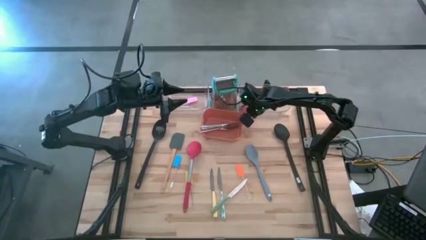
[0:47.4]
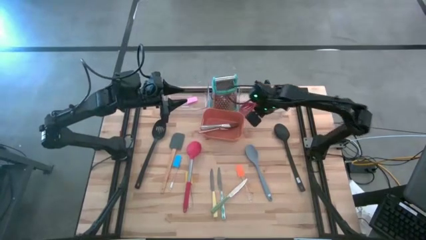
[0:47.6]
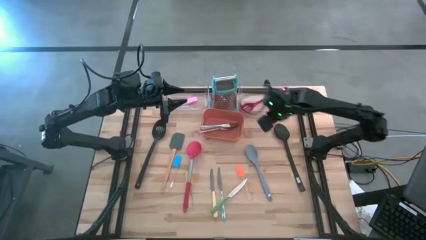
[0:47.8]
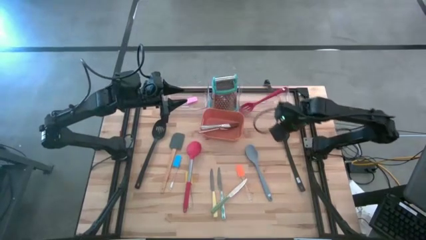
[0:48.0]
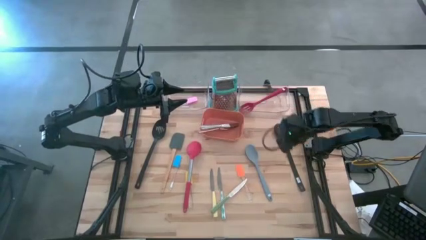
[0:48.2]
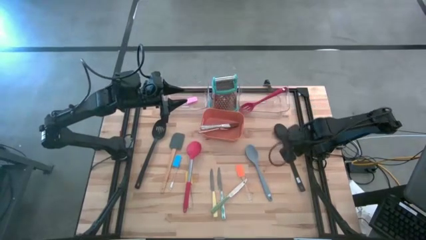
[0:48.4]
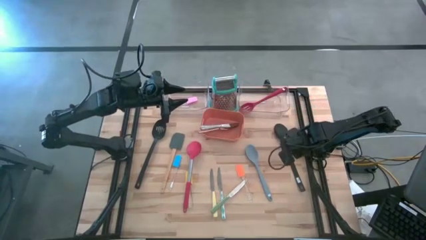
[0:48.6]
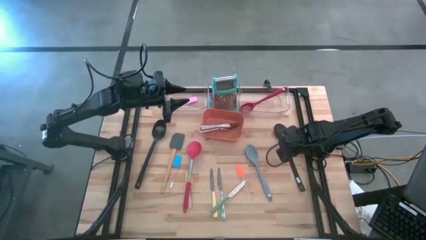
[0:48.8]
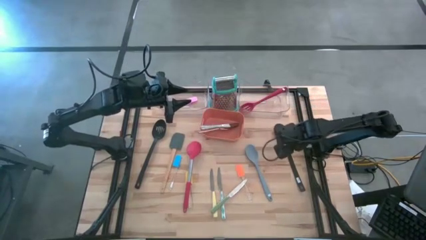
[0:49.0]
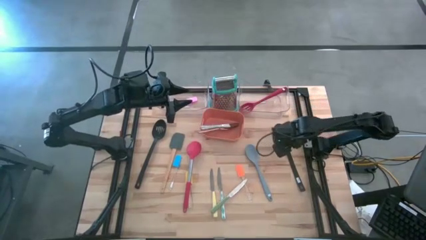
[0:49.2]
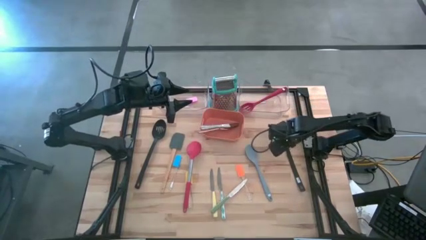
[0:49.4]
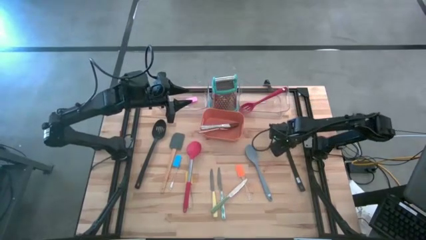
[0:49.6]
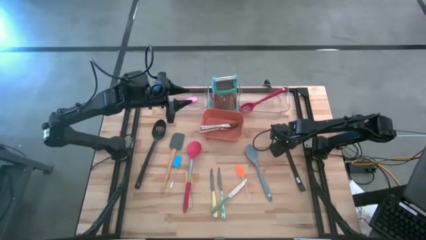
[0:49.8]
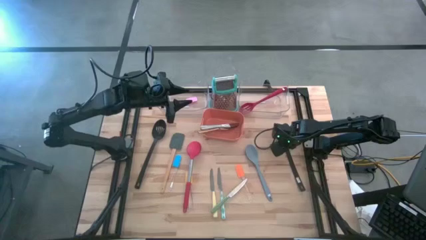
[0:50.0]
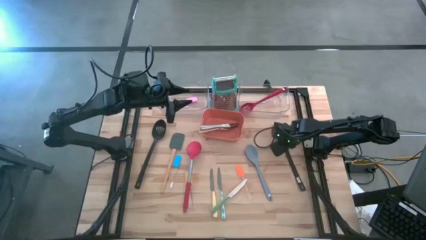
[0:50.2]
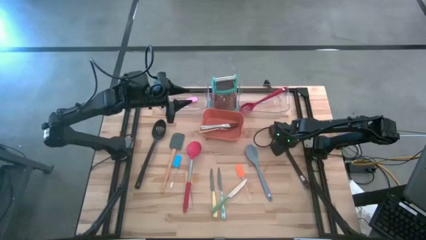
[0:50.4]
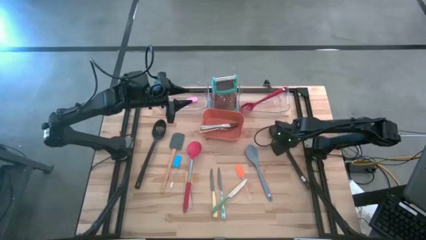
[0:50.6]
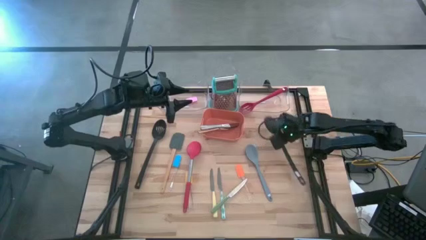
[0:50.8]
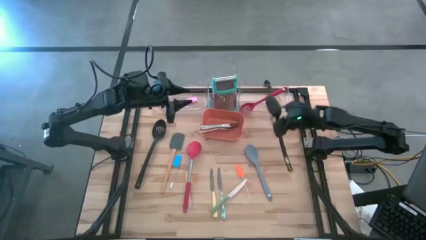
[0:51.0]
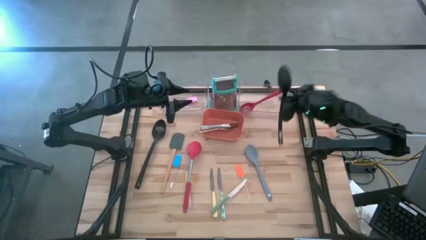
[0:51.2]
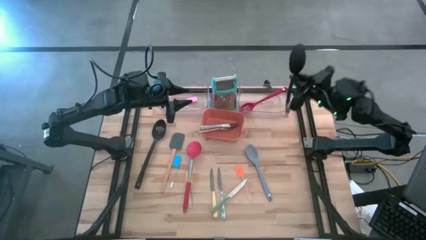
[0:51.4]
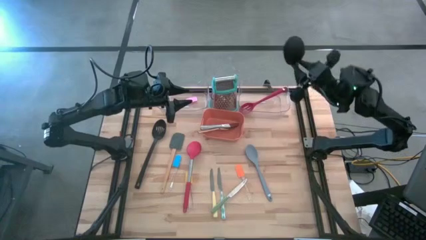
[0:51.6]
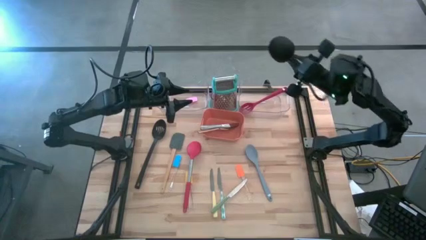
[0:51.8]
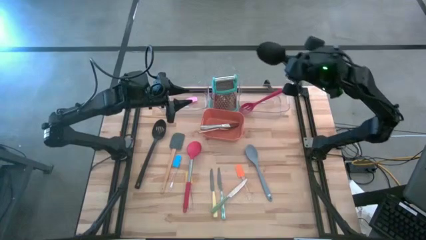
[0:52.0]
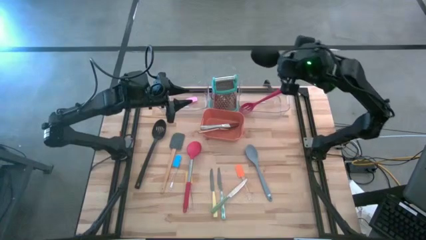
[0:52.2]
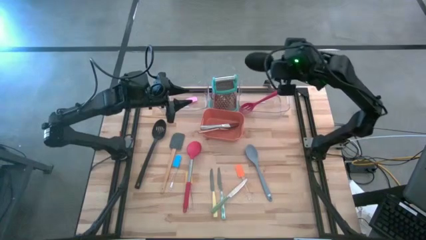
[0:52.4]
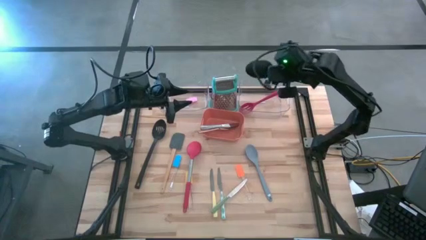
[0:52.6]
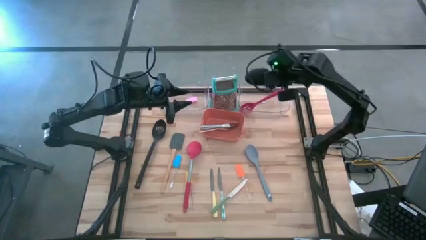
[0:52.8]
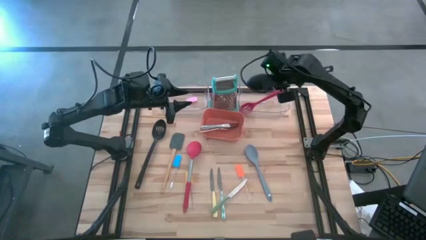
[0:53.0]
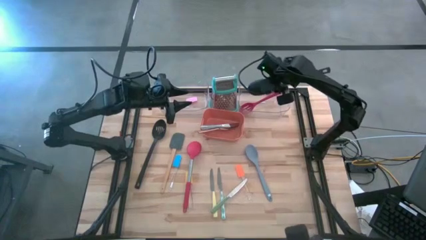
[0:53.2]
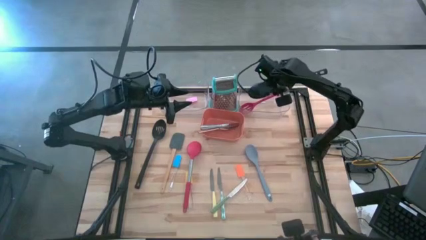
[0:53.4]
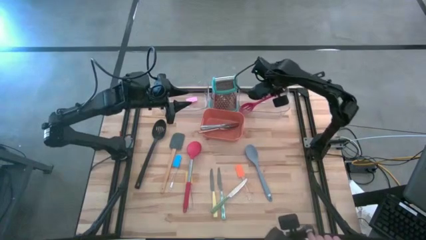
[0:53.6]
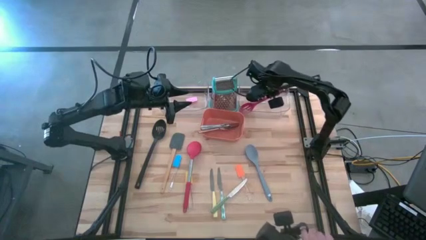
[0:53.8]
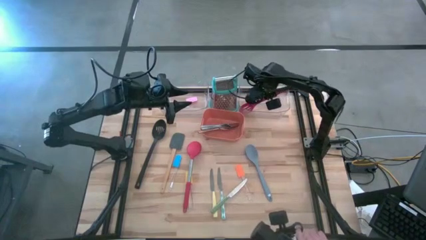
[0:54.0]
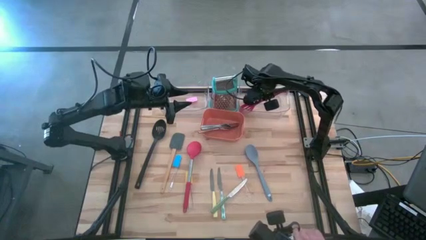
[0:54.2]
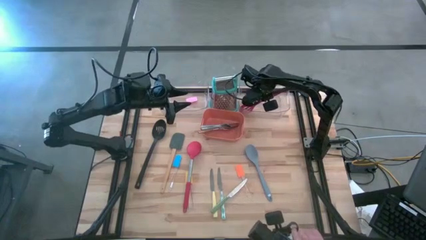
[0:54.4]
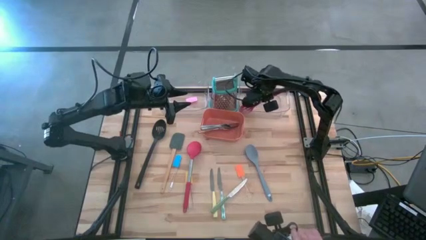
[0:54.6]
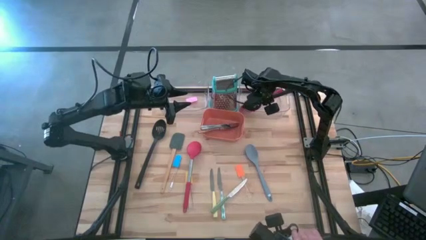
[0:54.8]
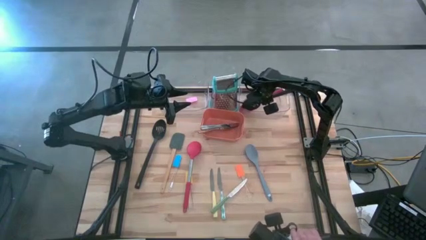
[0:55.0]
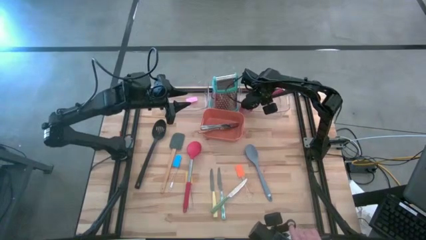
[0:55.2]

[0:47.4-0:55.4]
Task: Pick & Place Kitchen Items
Put the right black serving spoon into the right transparent bin

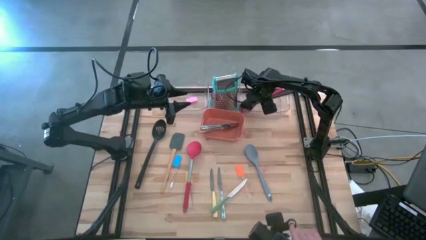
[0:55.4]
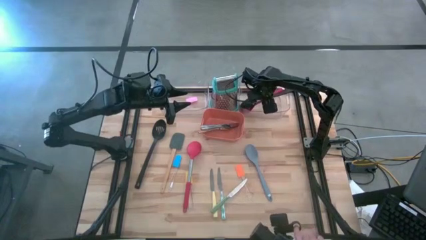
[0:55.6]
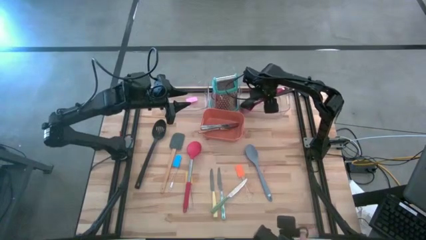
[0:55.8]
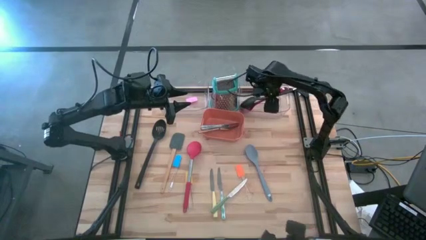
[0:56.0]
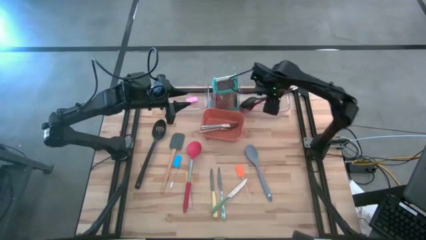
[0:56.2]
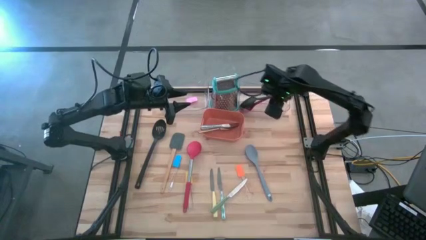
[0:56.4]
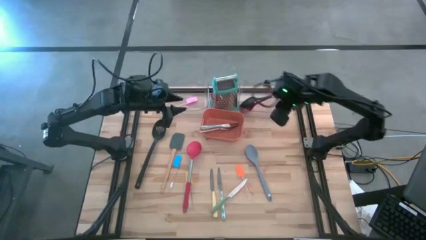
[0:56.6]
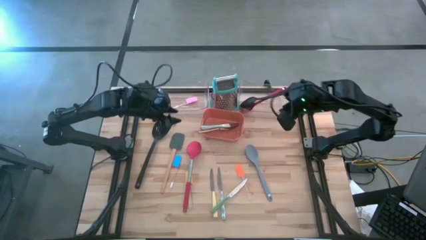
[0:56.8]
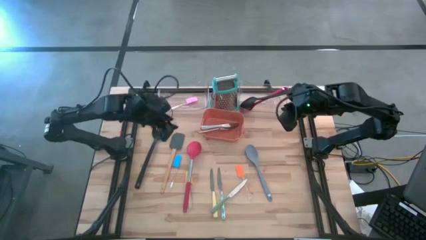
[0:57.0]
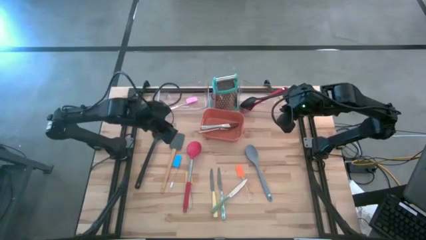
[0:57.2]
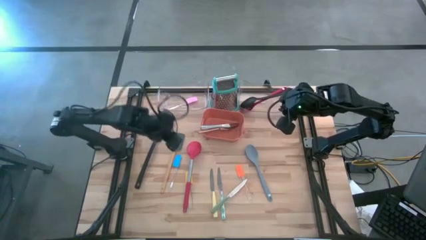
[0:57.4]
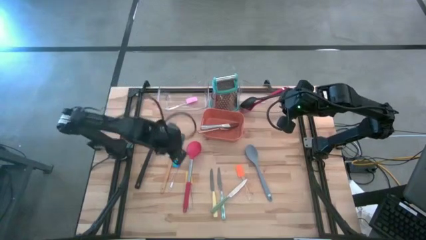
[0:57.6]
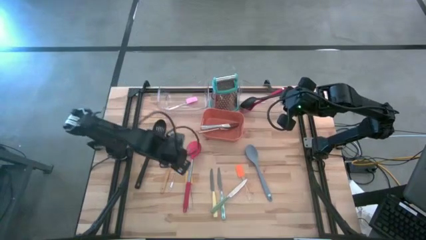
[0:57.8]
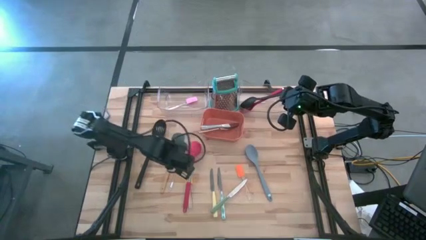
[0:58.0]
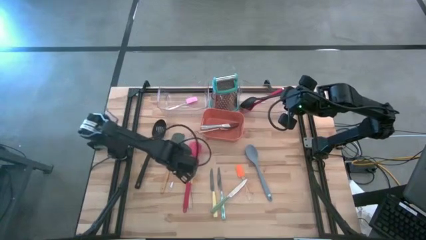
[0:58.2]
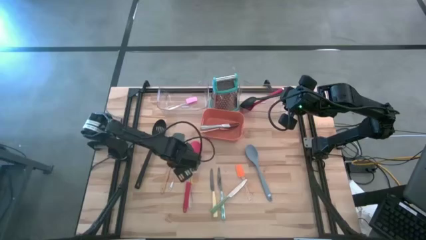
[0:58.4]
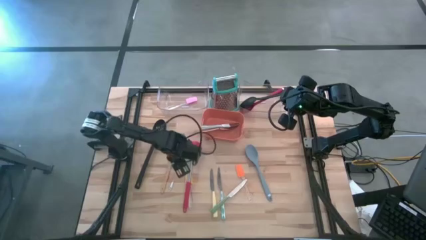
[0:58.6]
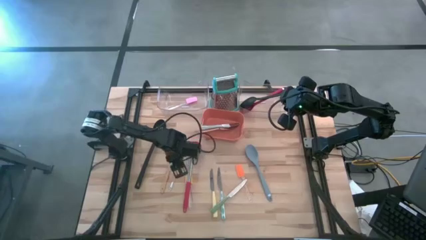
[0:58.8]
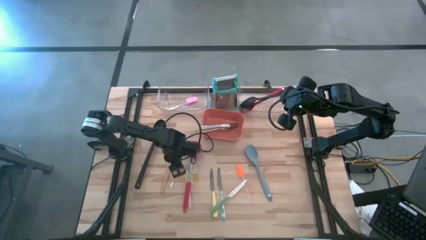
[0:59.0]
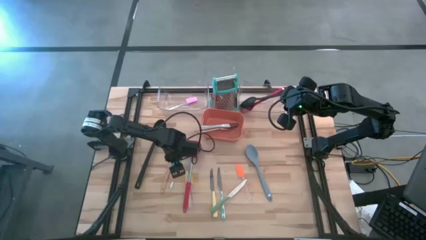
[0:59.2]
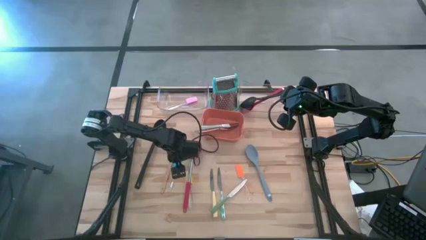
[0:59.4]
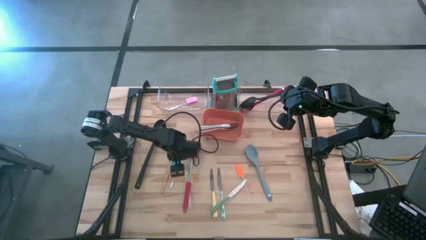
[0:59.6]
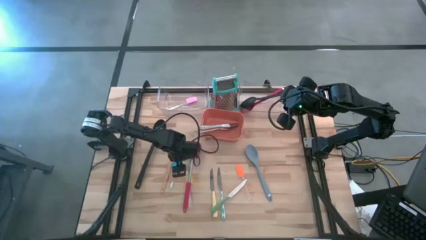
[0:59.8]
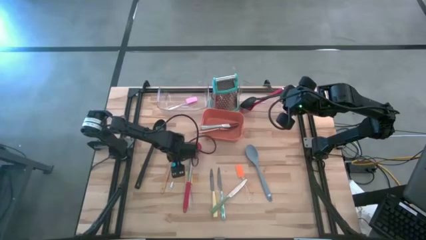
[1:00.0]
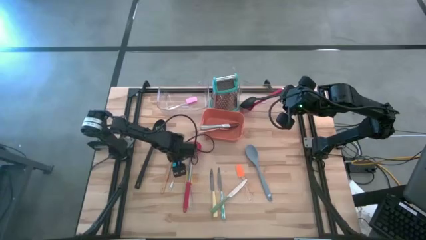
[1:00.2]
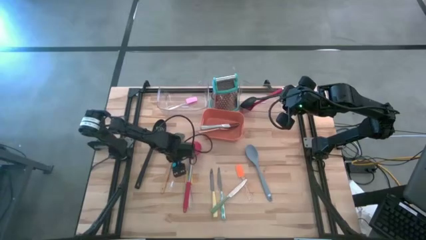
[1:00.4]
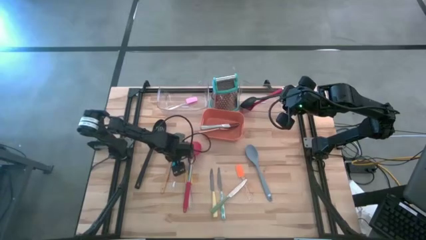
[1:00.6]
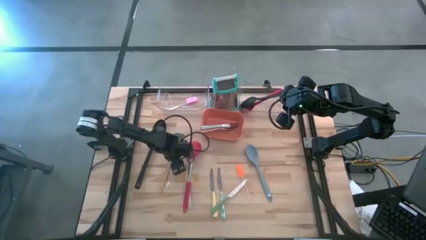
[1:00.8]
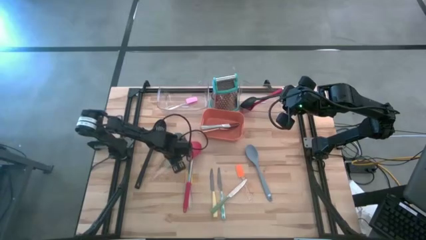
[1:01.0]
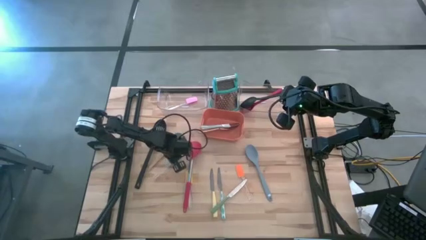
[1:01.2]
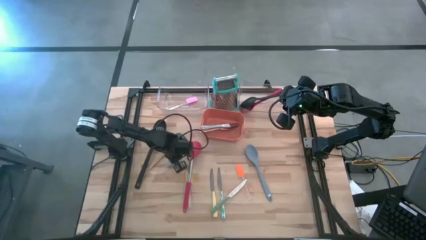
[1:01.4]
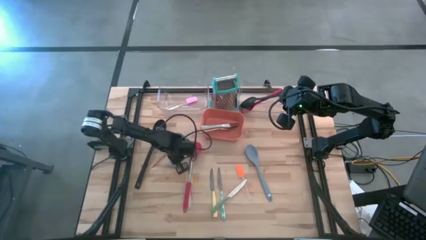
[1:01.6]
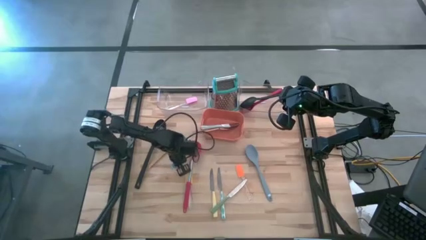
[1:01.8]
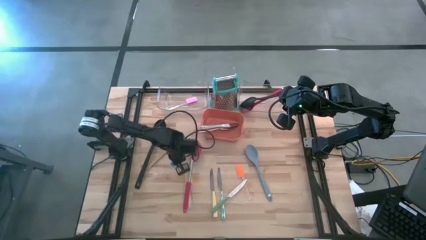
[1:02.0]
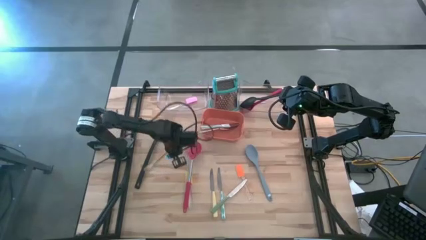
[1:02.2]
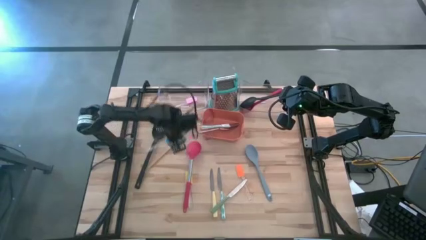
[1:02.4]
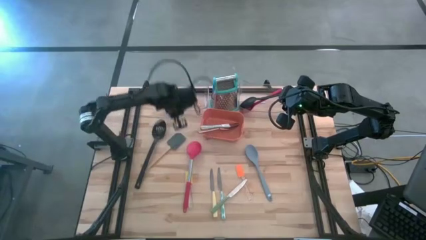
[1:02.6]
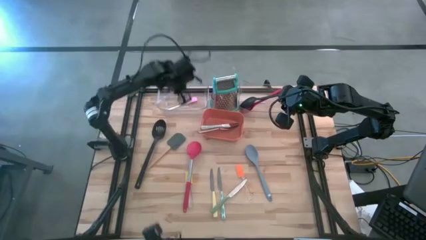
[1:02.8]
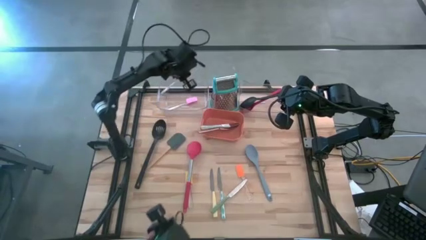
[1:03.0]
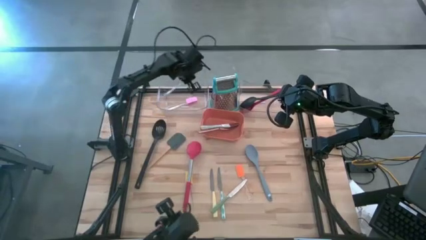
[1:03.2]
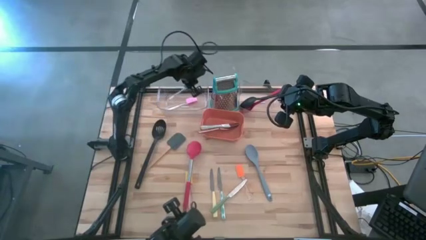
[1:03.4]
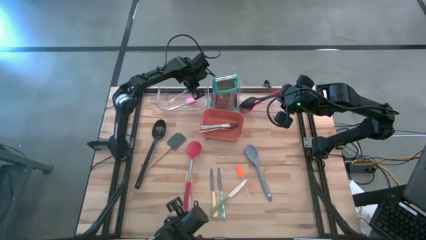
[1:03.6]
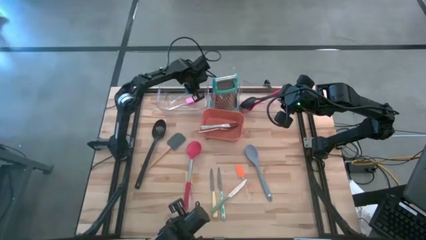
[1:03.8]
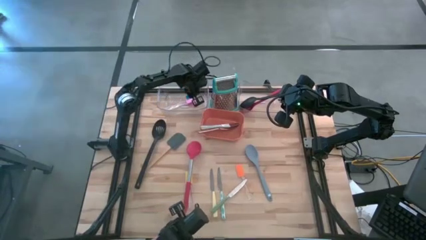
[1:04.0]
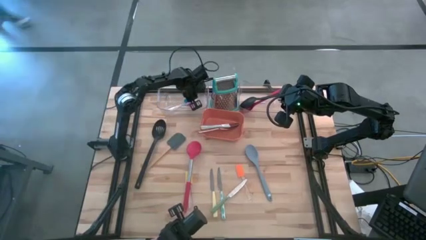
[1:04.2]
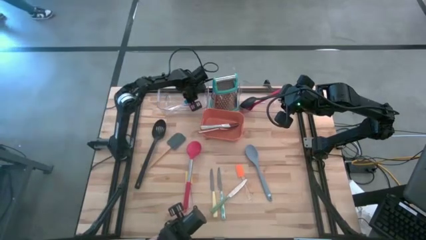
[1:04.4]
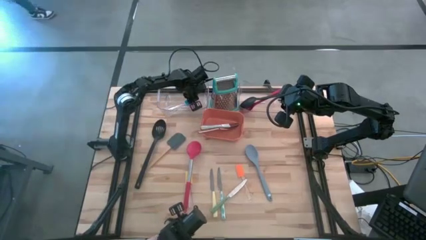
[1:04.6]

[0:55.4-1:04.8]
Put the blue spatula into the left transparent bin
